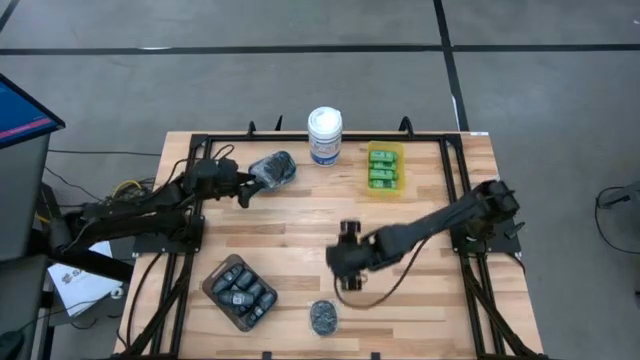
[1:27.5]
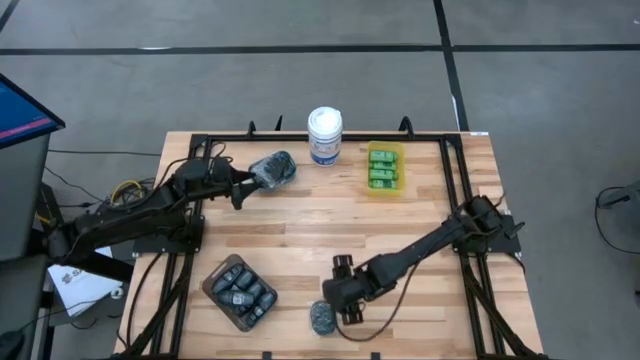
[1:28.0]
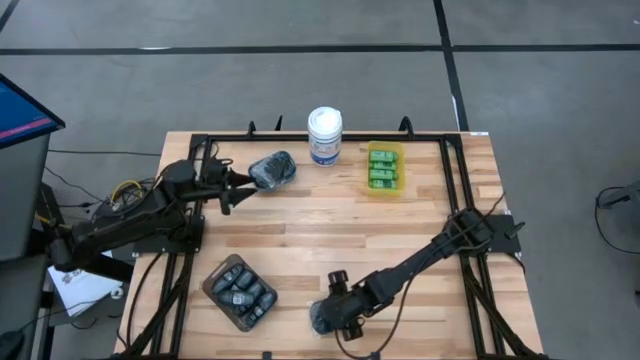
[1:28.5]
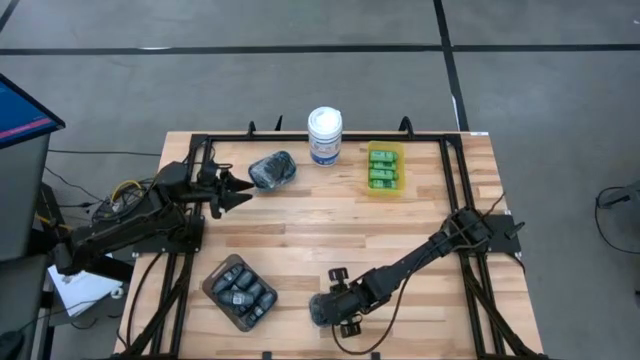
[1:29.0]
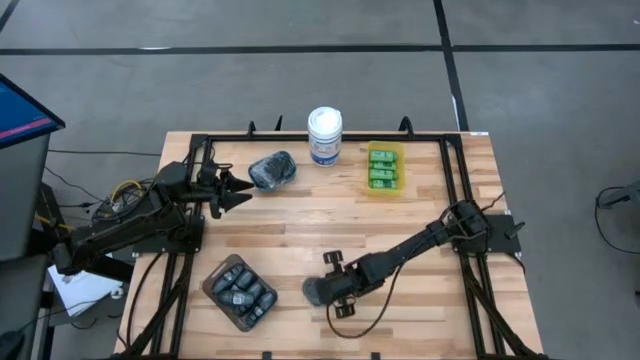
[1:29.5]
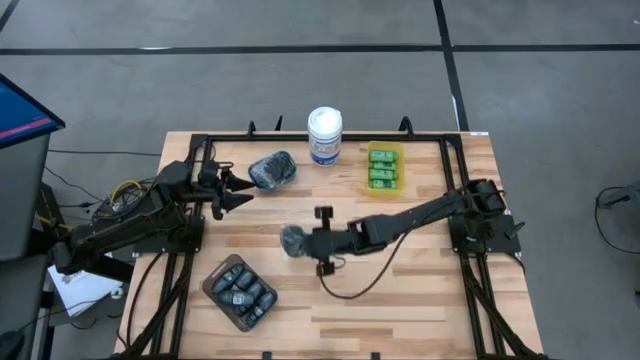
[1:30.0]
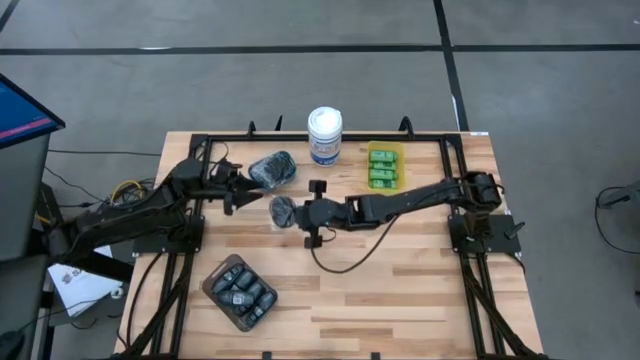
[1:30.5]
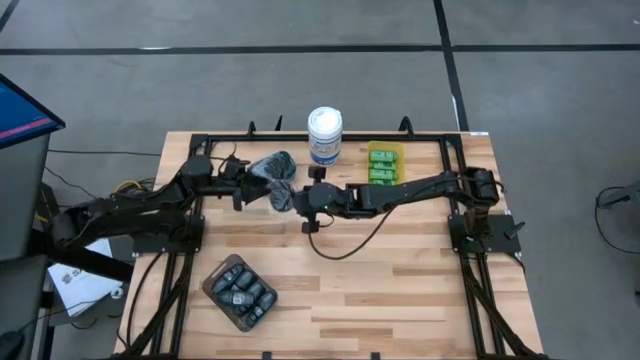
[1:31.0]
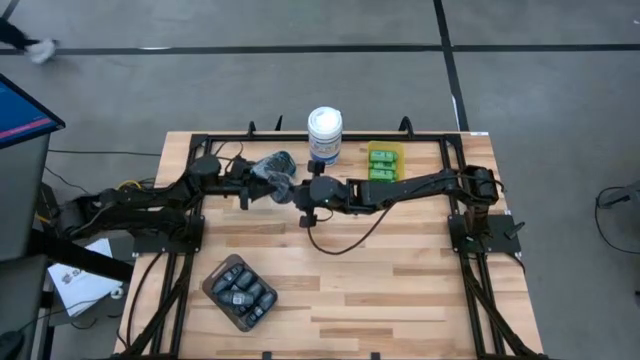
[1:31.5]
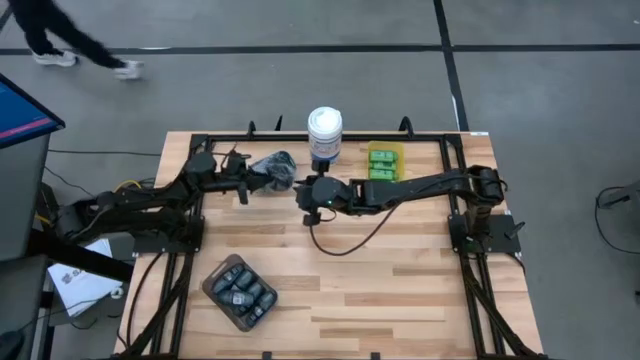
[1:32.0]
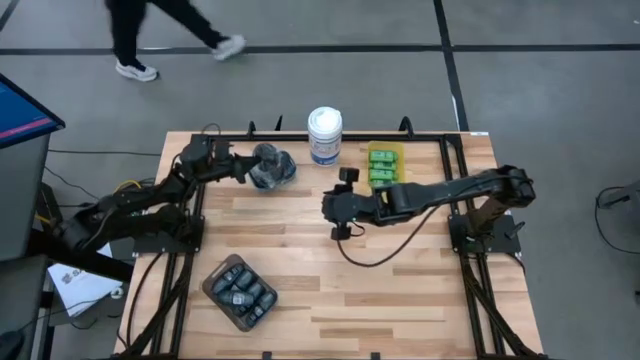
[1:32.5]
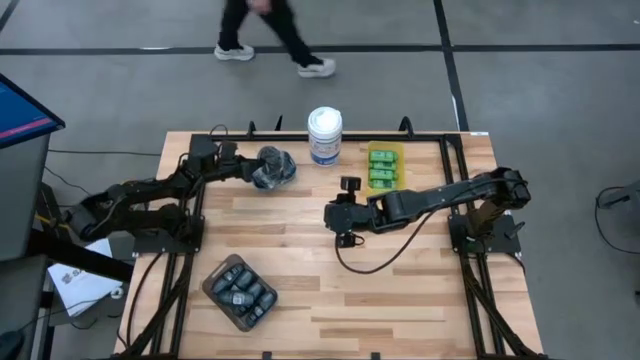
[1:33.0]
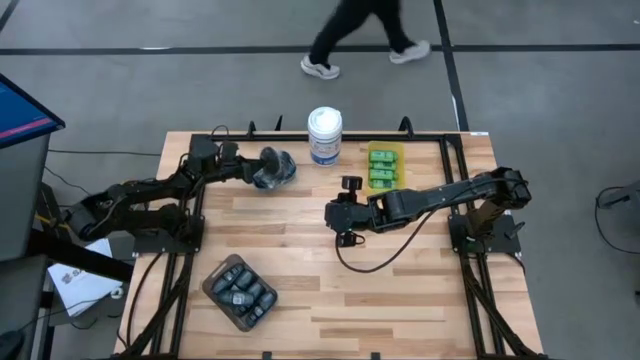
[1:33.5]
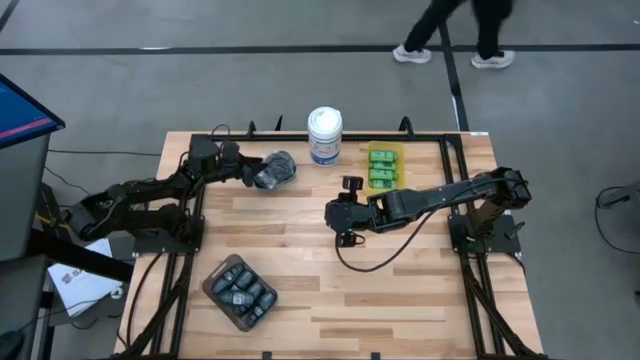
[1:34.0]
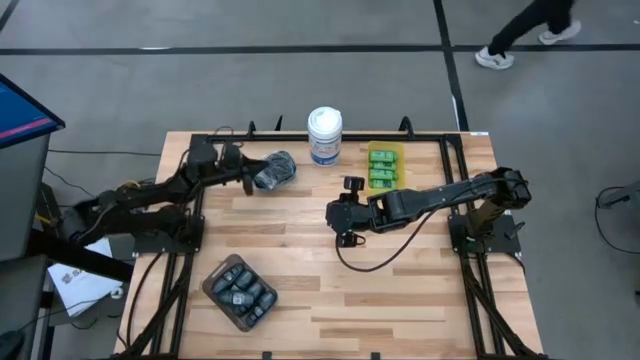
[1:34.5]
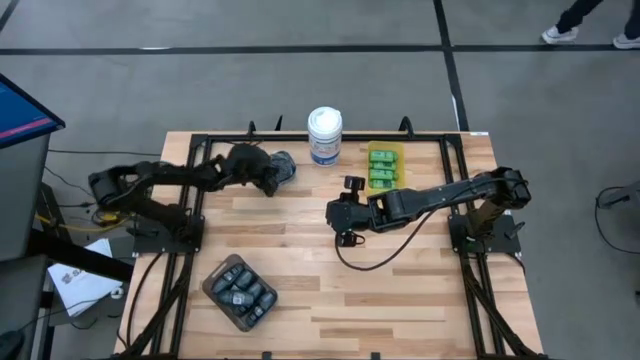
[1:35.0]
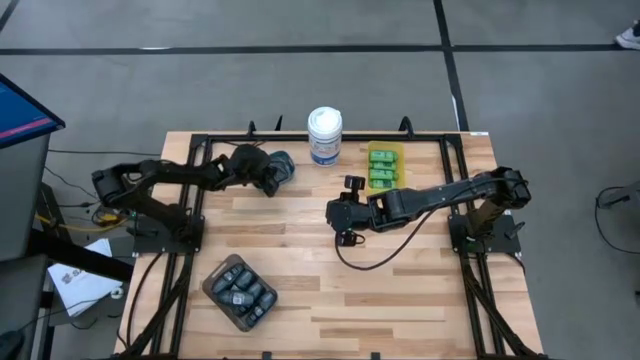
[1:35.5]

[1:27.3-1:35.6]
Task: Pick & Place Travel size toiletries
Put the black hairbrush into the blue bin

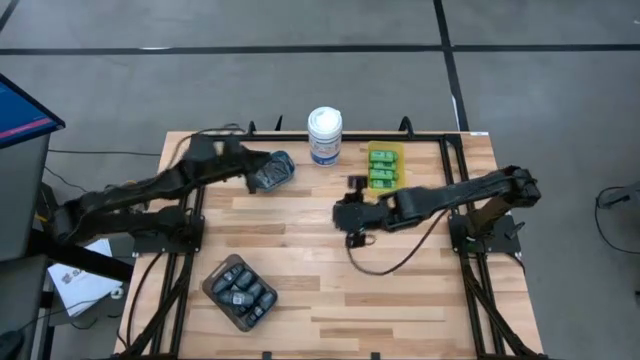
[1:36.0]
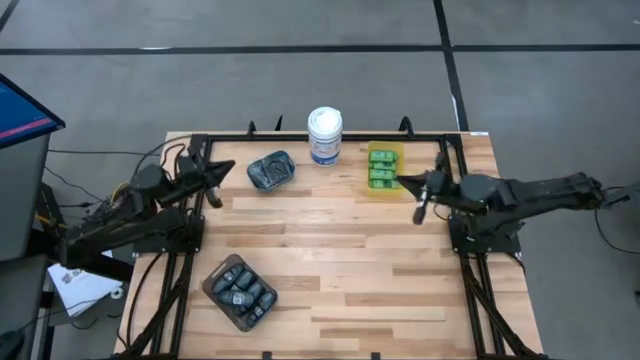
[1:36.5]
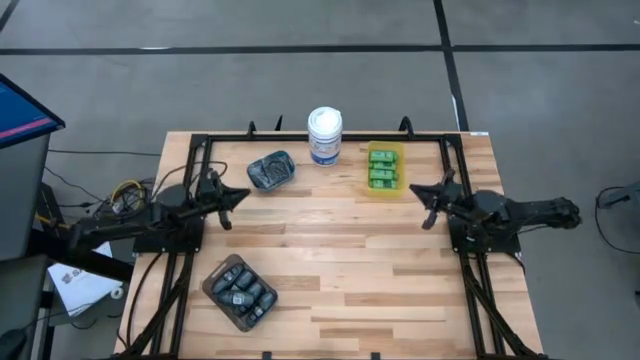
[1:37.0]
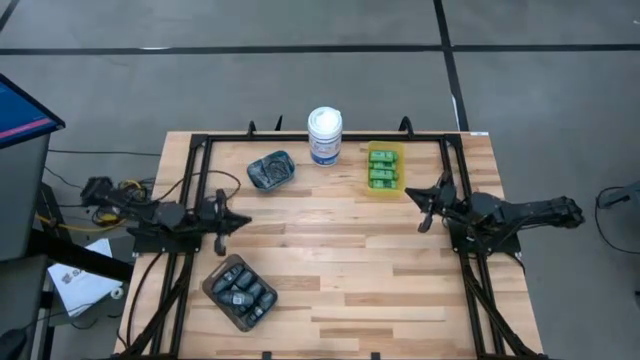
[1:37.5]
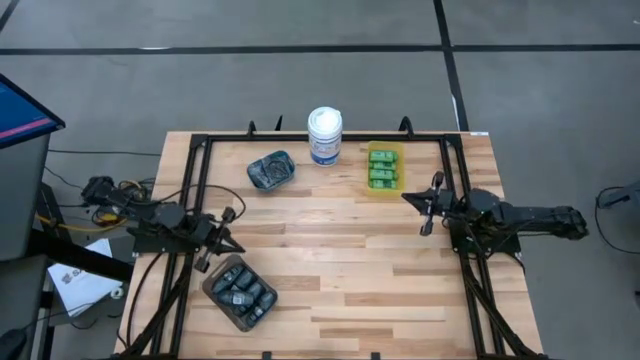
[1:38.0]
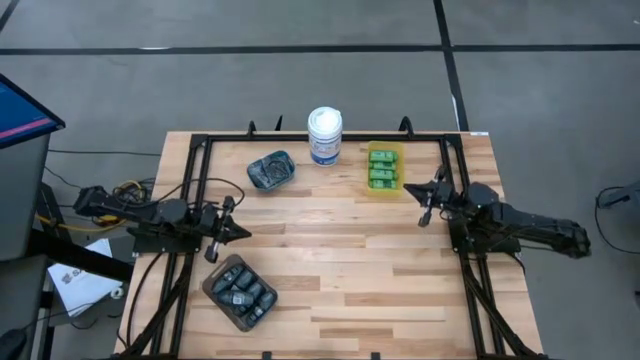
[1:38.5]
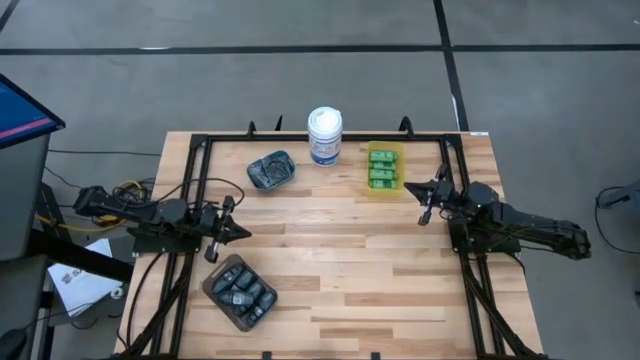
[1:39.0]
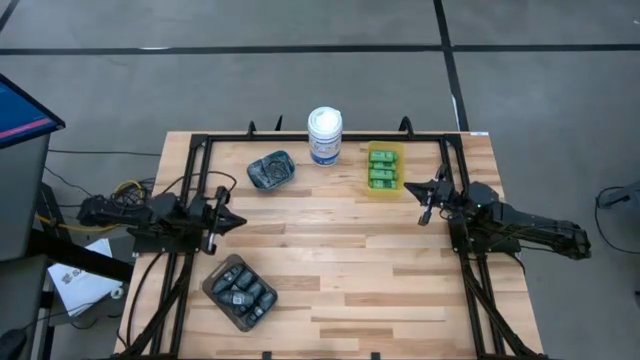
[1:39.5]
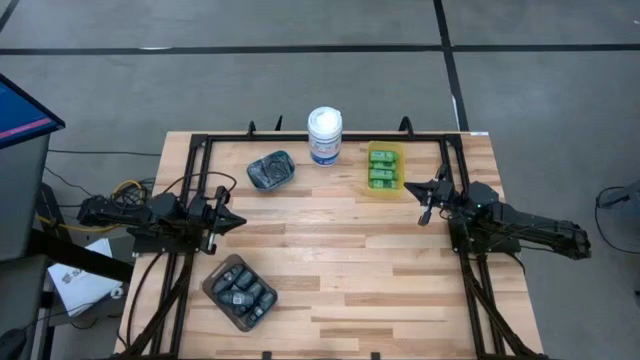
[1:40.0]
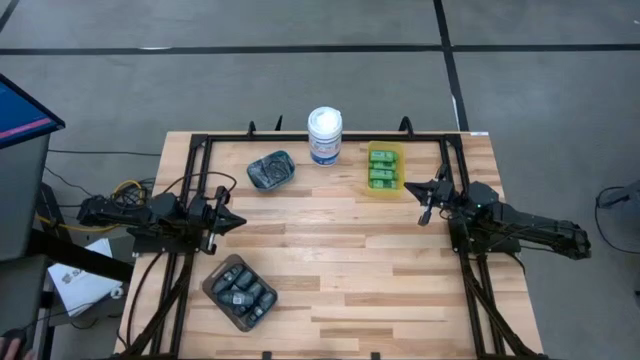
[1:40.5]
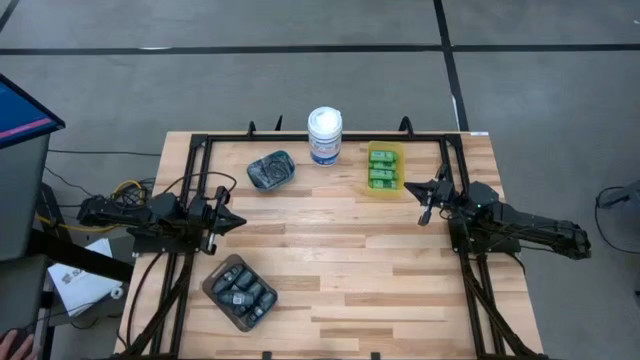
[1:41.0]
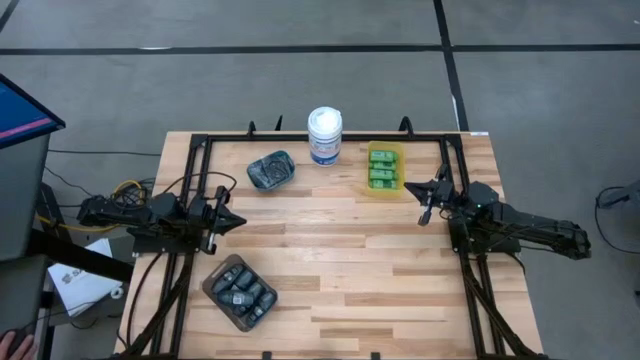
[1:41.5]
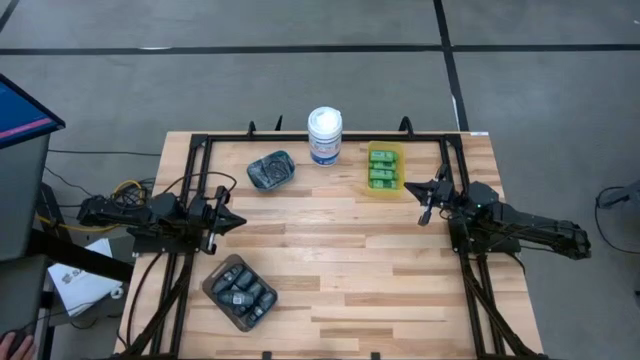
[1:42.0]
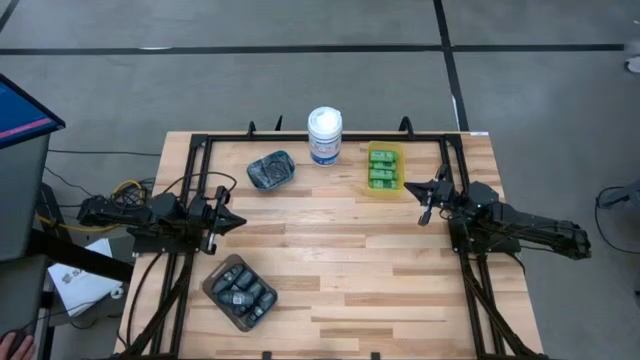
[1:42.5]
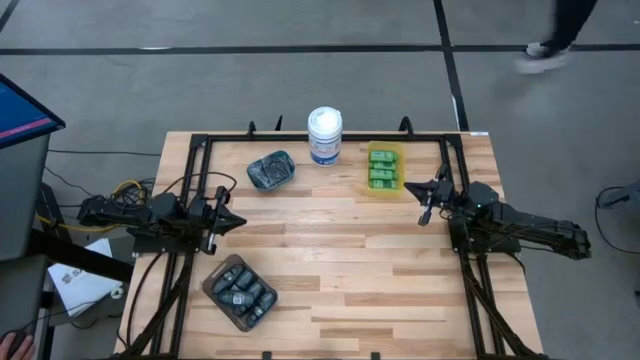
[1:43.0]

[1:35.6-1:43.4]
Return to Home Position

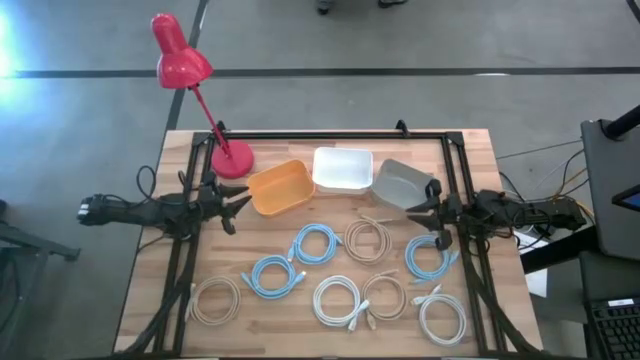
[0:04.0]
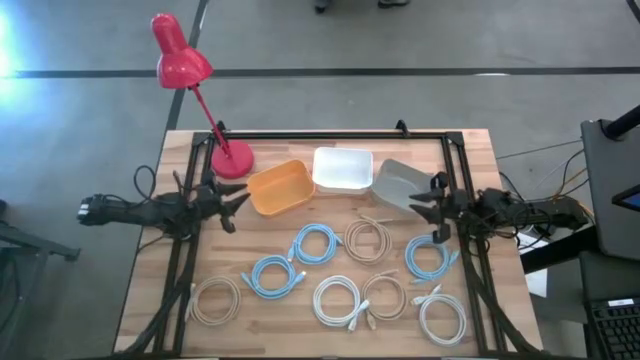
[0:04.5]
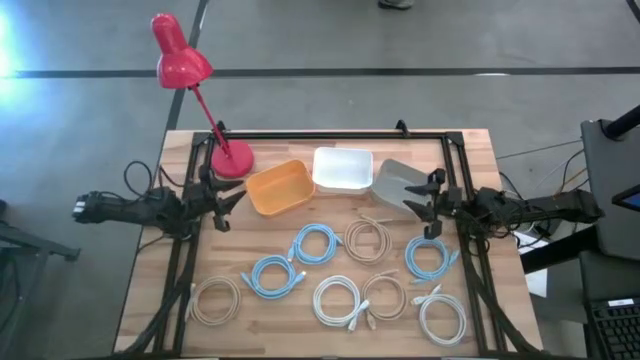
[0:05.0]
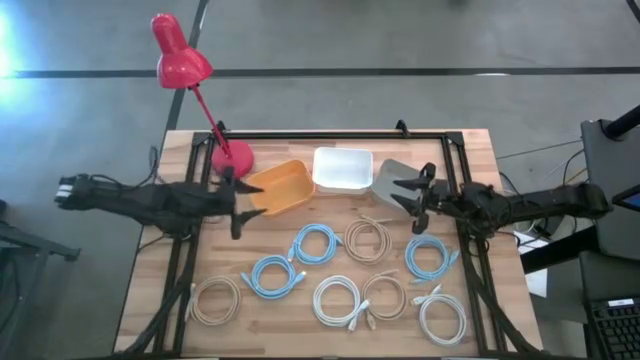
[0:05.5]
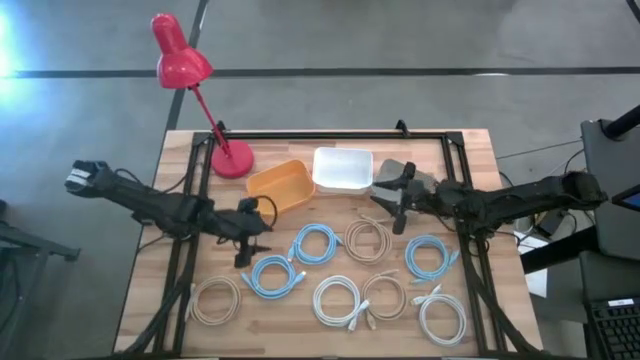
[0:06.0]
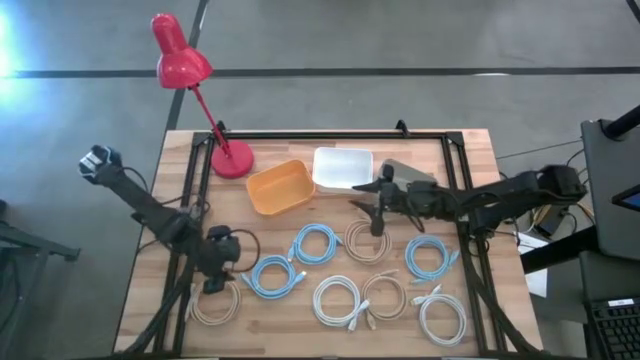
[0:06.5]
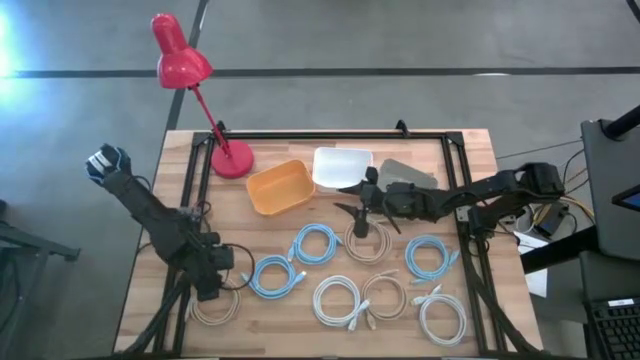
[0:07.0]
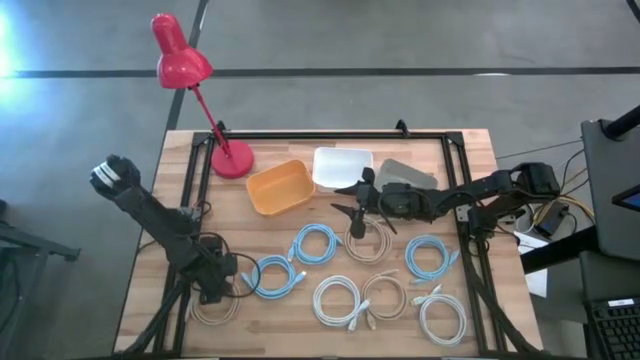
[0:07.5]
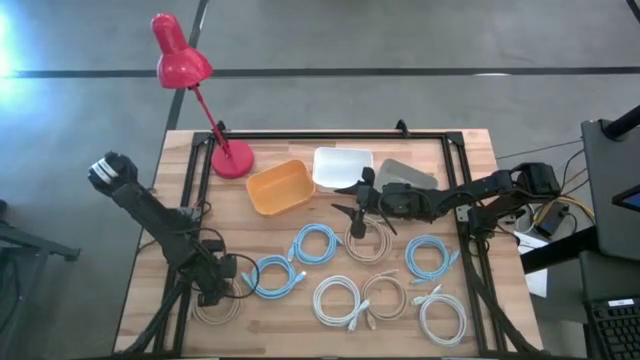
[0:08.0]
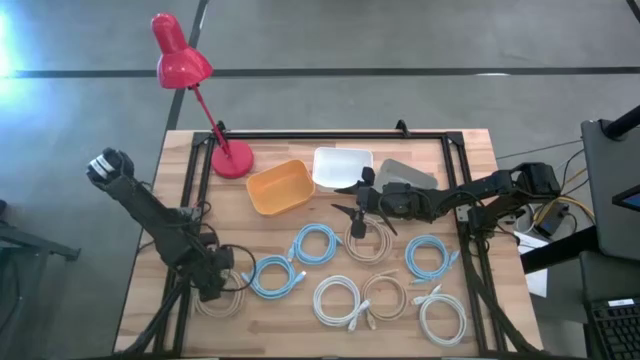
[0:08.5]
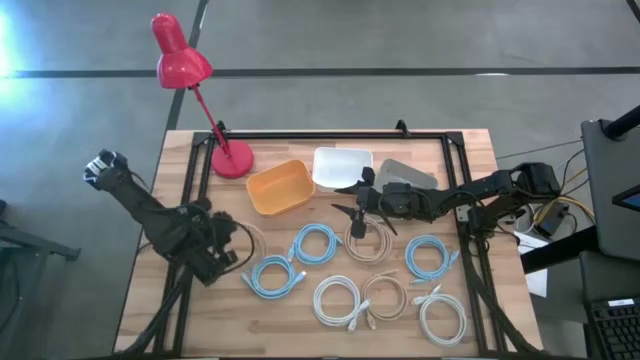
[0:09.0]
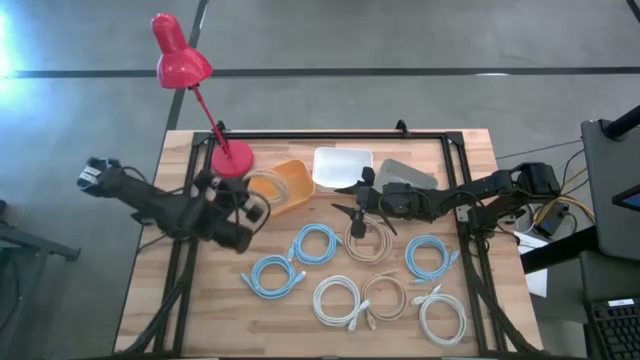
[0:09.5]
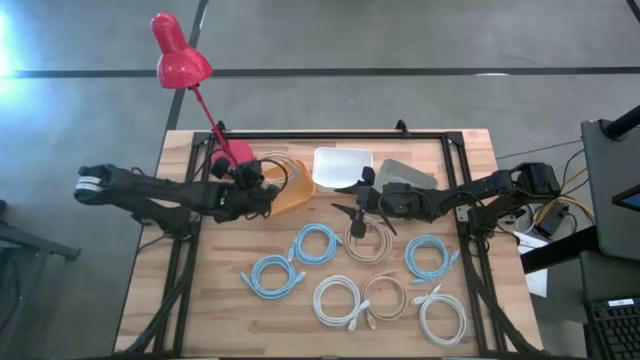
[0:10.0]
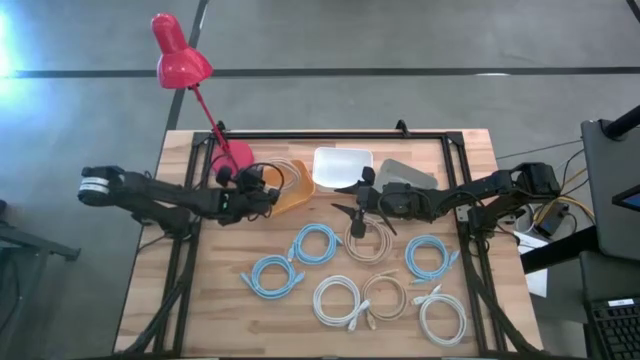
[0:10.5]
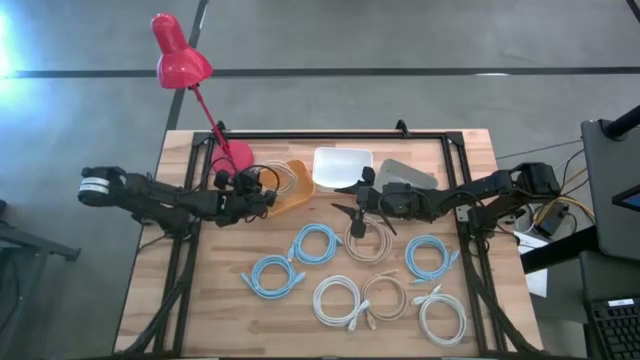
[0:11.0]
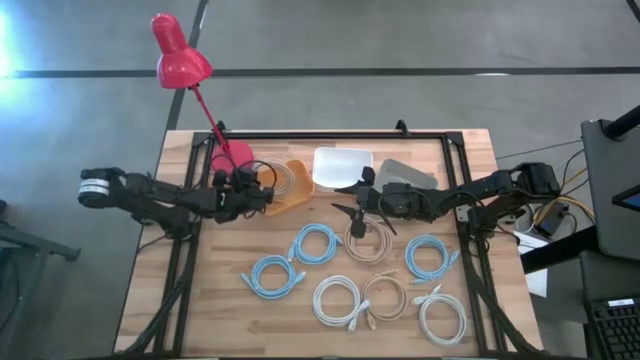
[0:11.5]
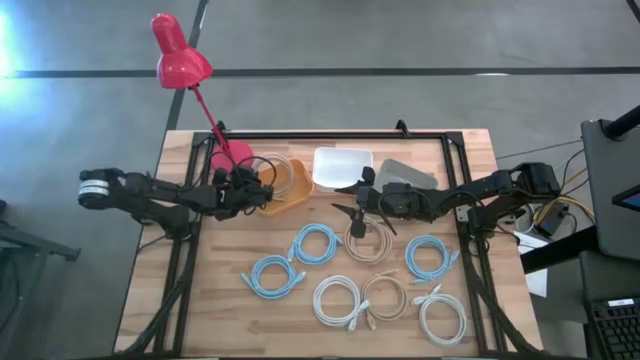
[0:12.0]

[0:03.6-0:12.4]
Task: Pick & Place USB Port
Put the bottom left brown usb cable into the yellow bin
